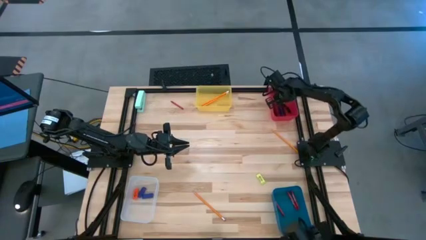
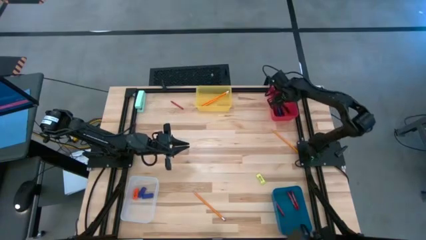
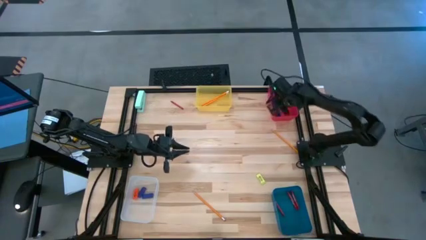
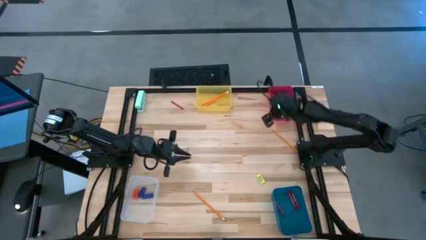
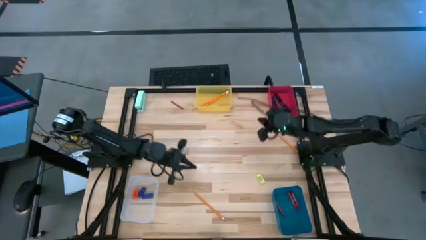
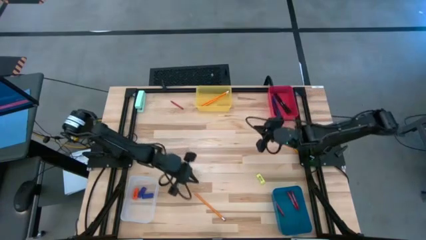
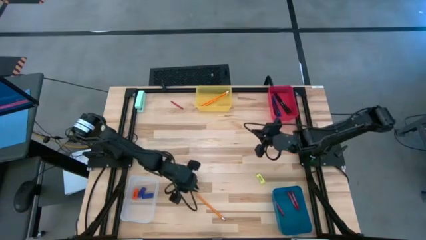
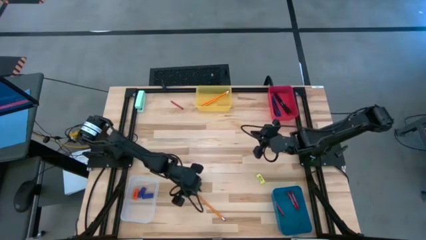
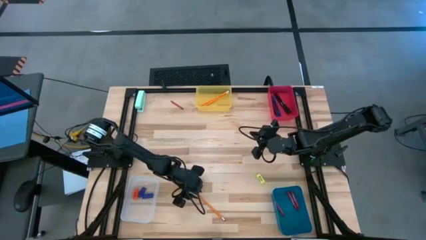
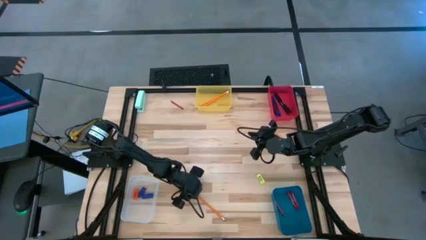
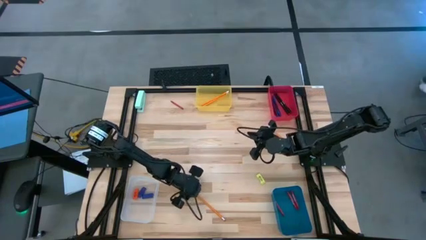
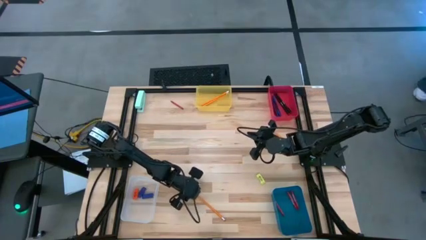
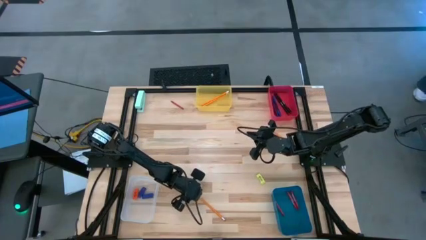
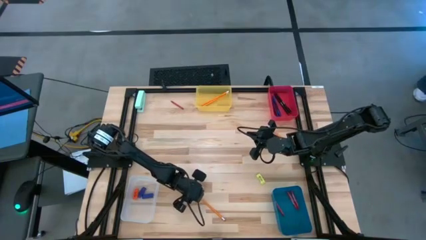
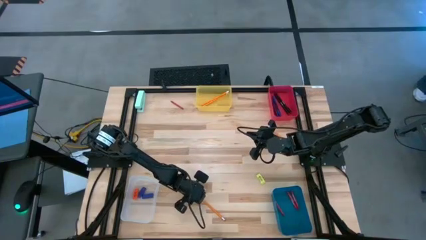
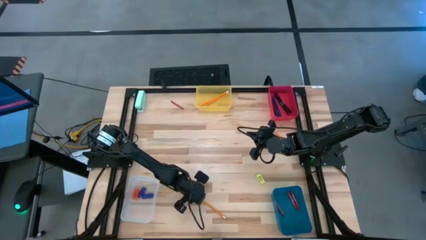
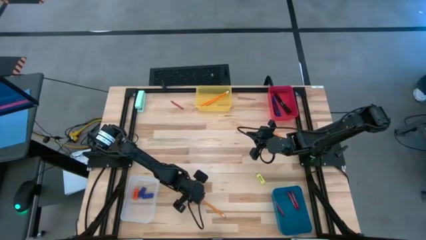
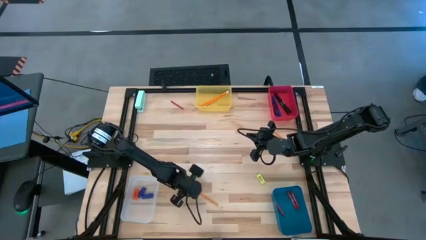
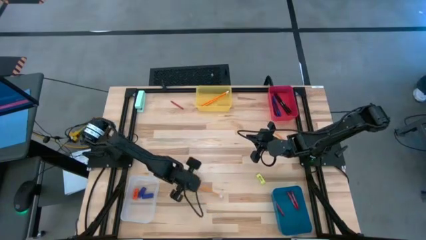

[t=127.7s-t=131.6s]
Task: Sort crayons/erasers/pens/pencils in bins
Put the orange pencil into the yellow bin

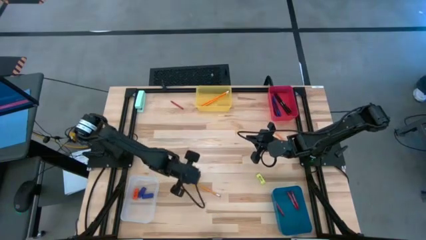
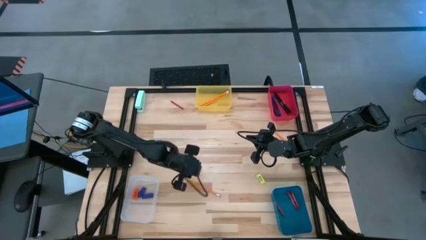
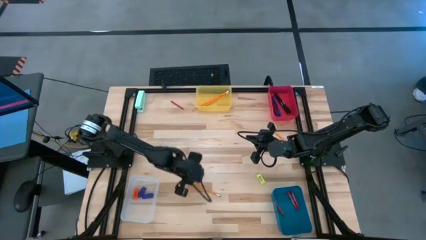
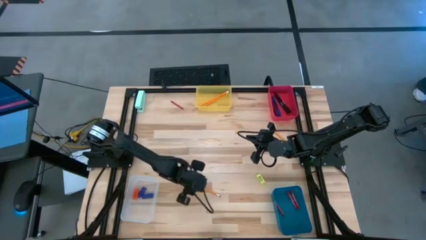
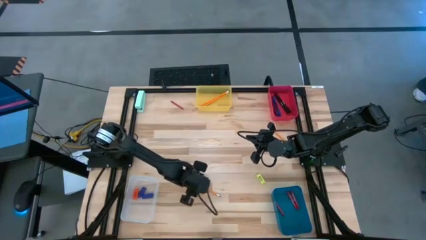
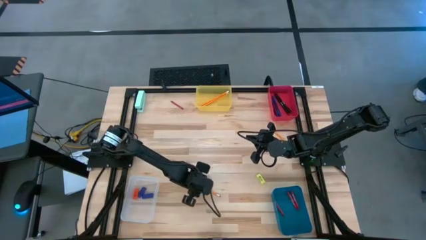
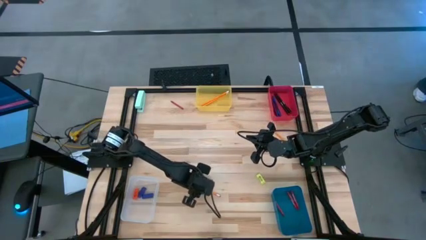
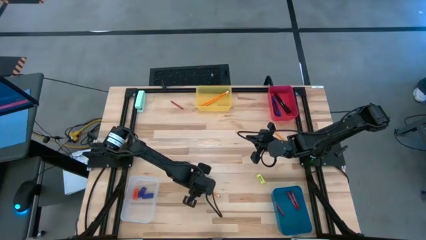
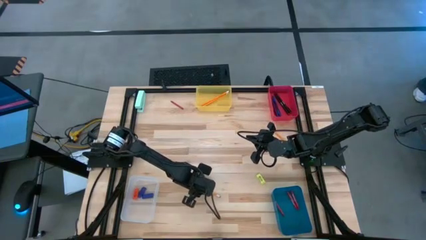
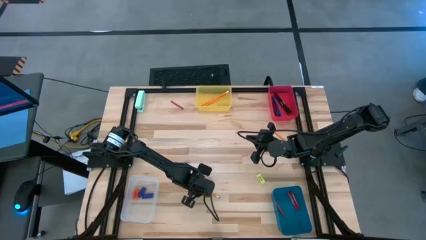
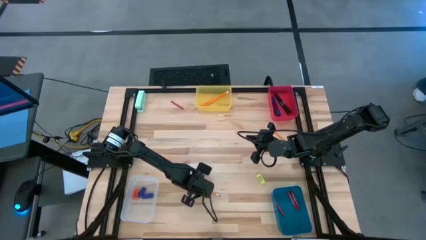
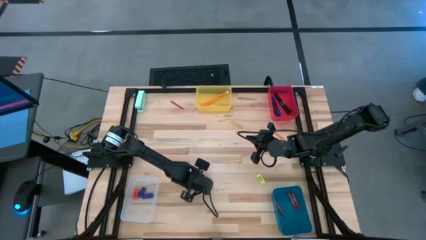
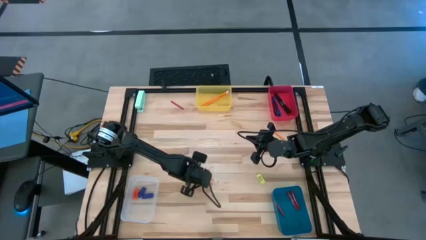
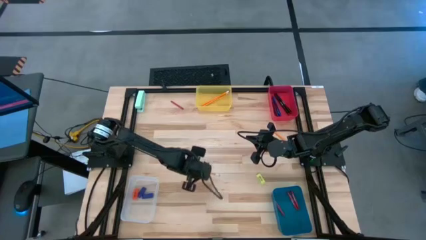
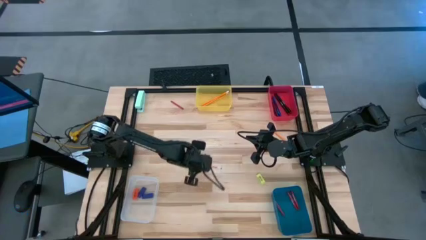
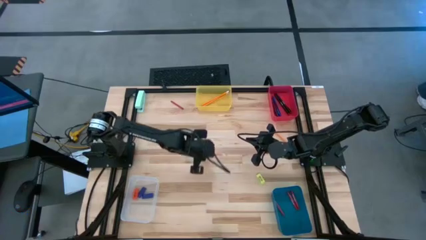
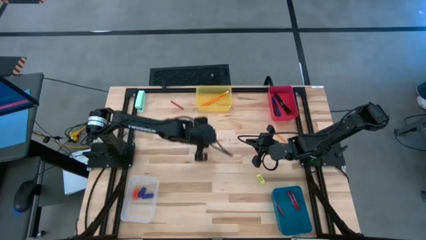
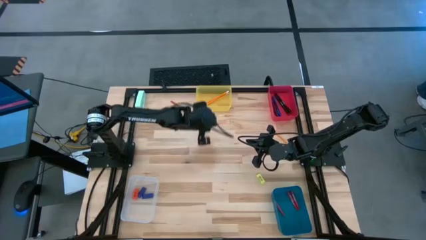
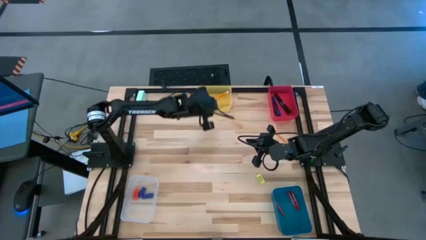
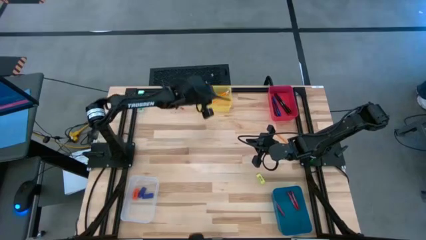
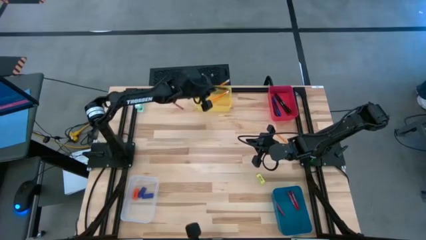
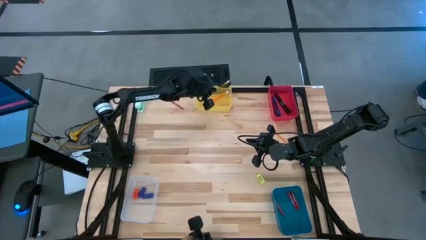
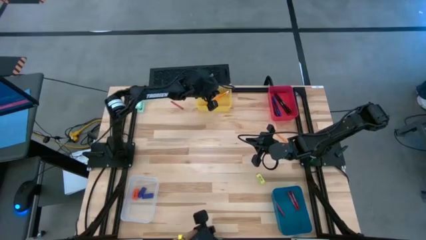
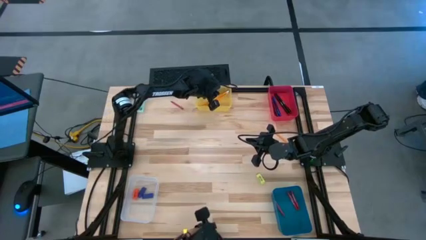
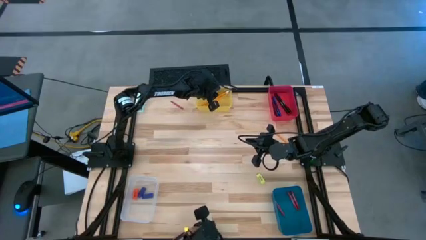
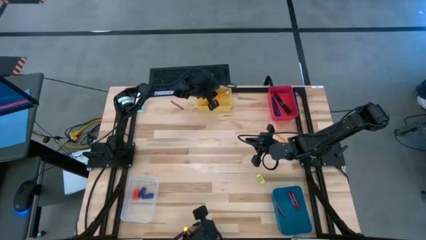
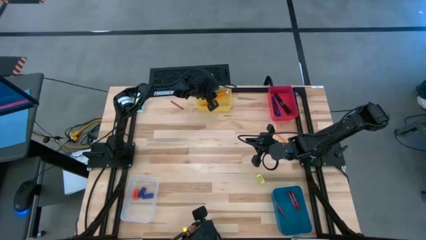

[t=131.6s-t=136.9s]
Put the orange pencil into the yellow bin

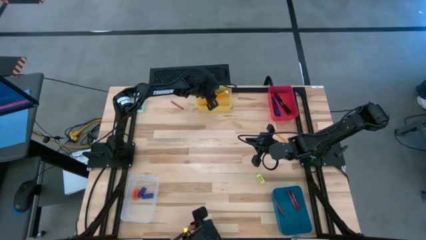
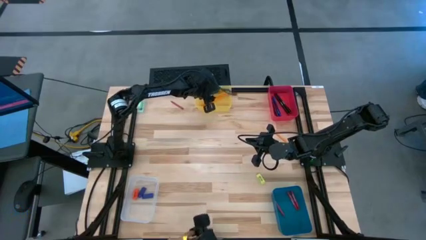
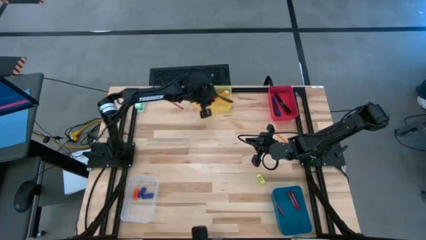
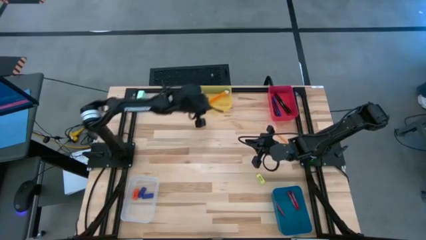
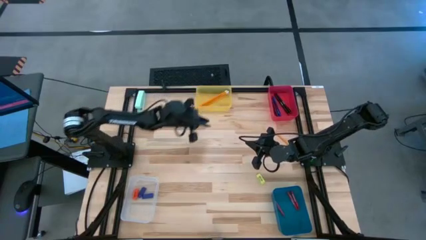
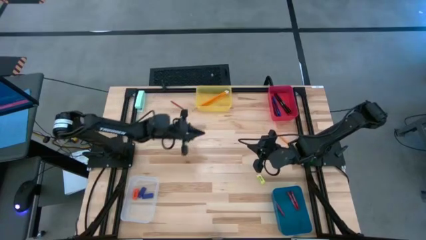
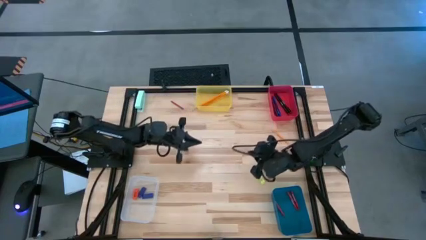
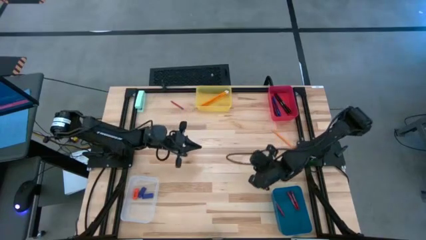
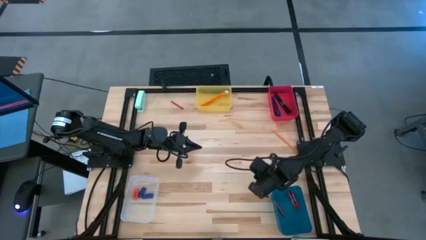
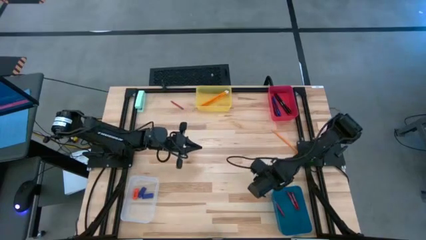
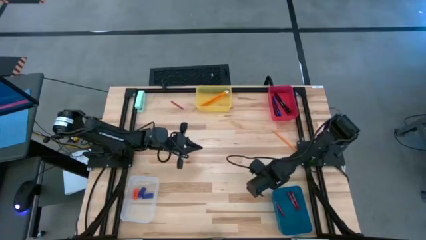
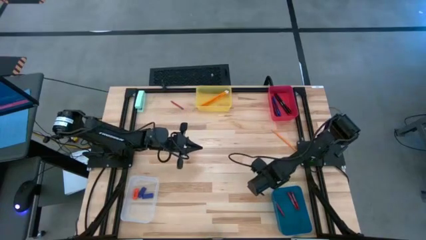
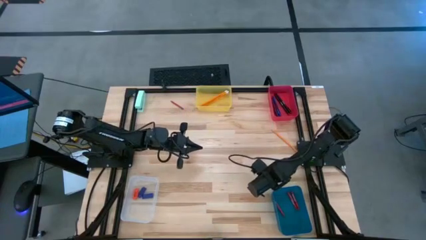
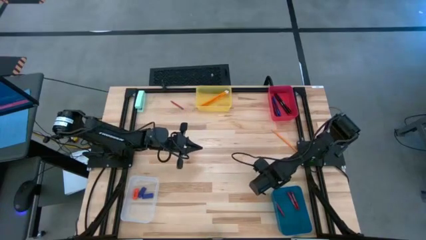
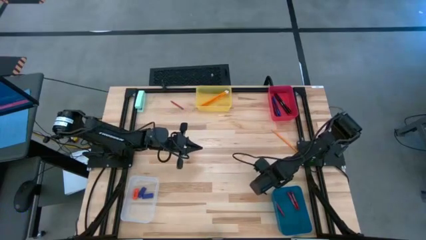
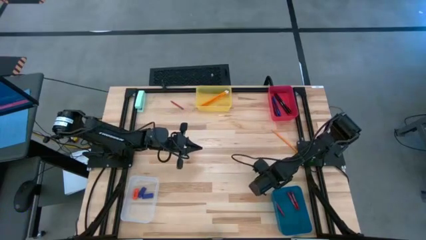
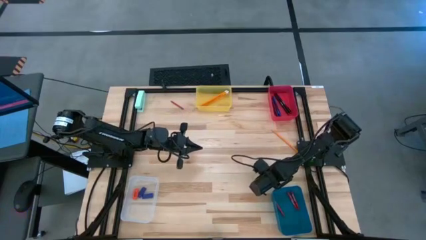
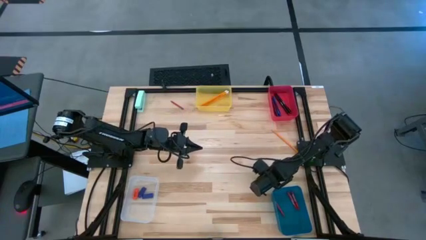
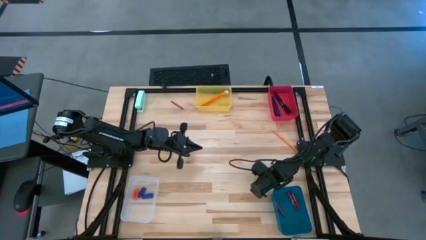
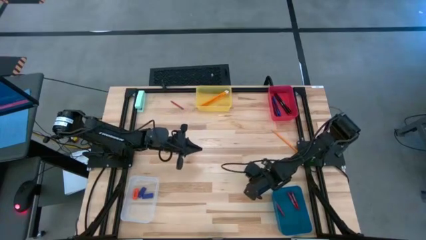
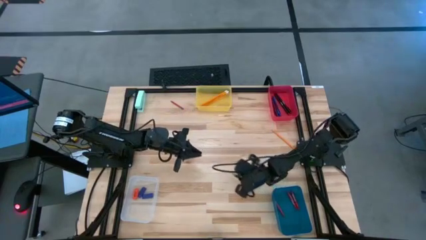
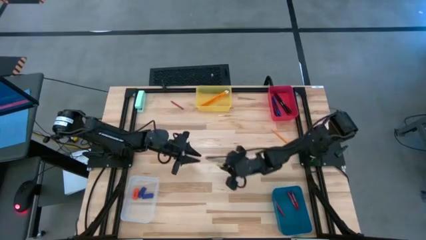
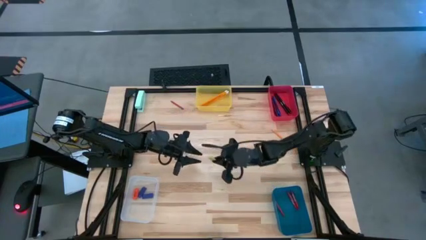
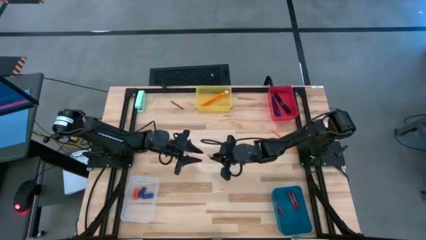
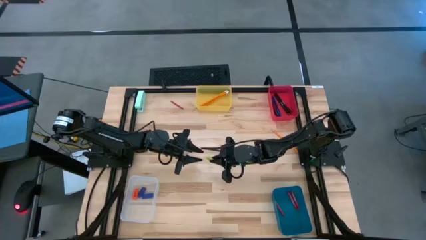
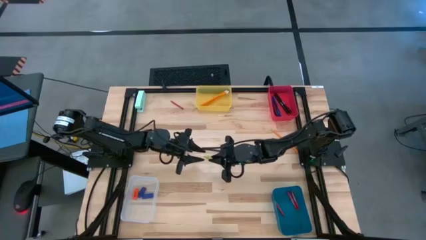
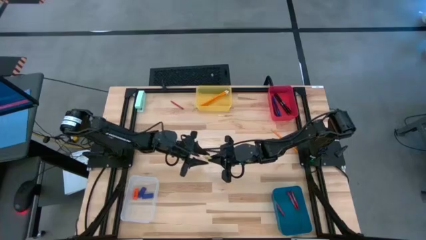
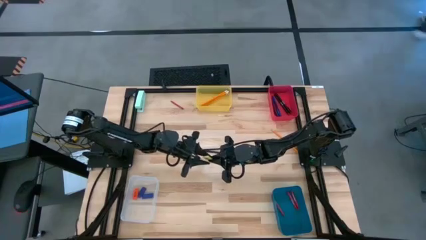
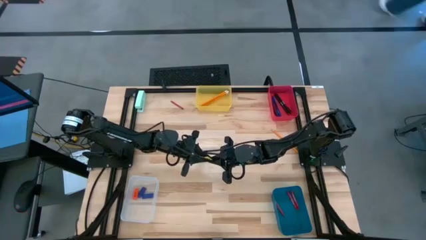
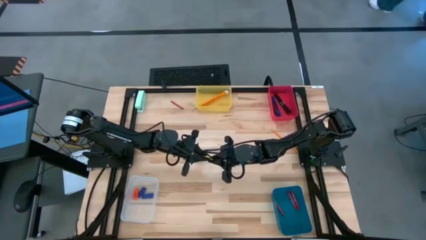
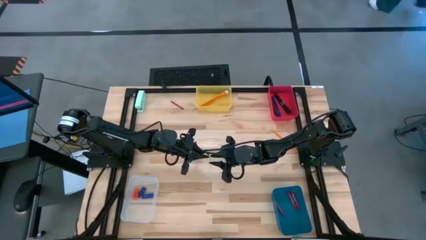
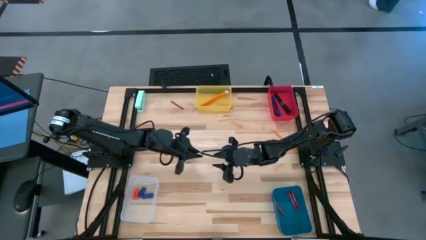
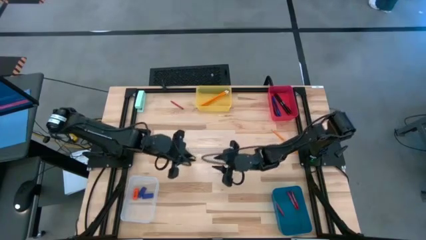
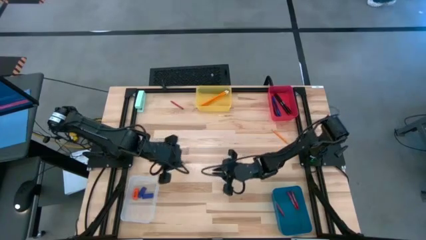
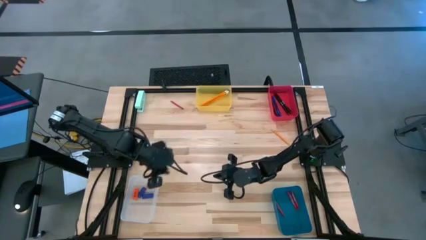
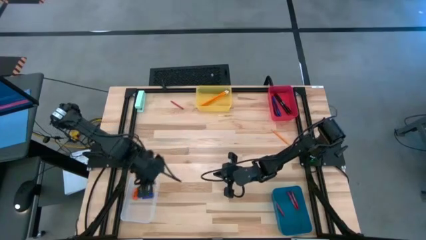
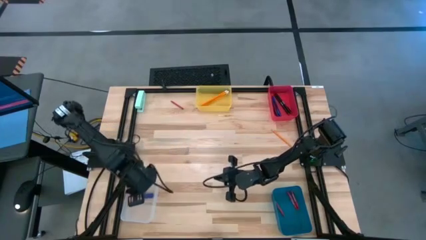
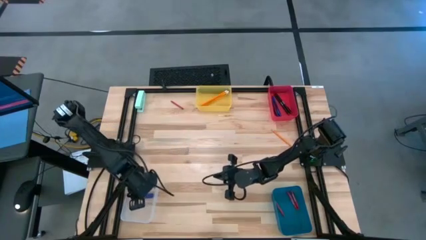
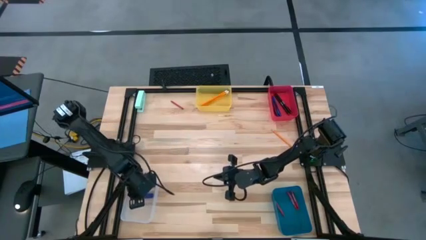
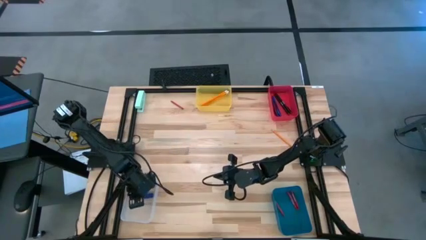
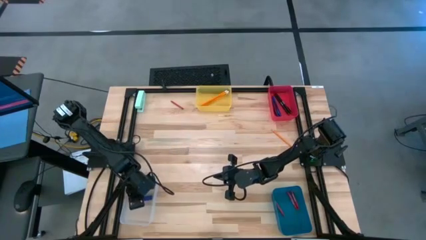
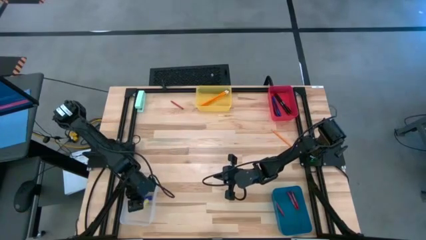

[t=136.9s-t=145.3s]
Put the green eraser into the transparent bin
